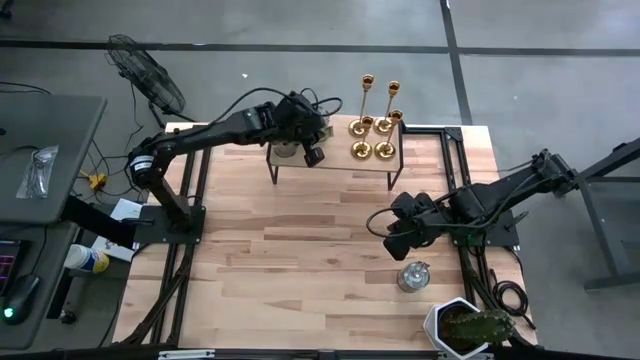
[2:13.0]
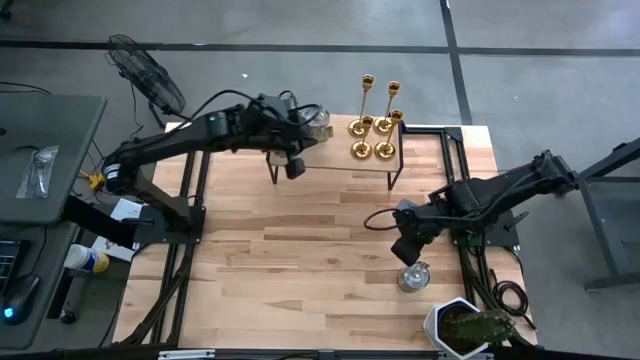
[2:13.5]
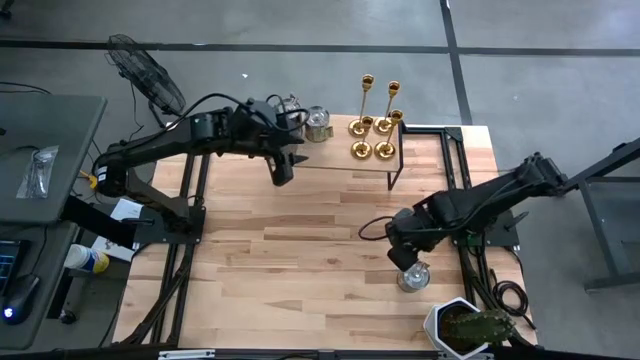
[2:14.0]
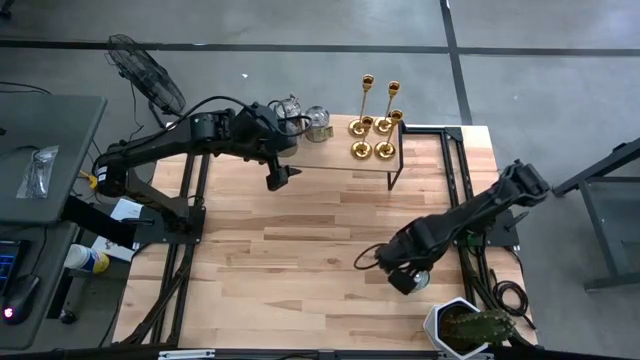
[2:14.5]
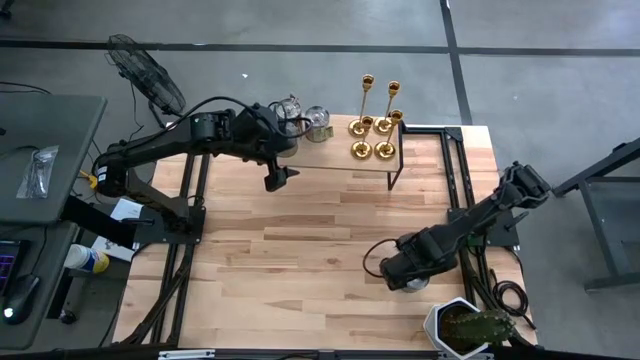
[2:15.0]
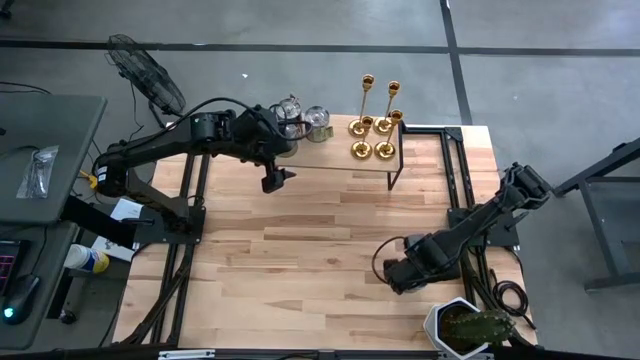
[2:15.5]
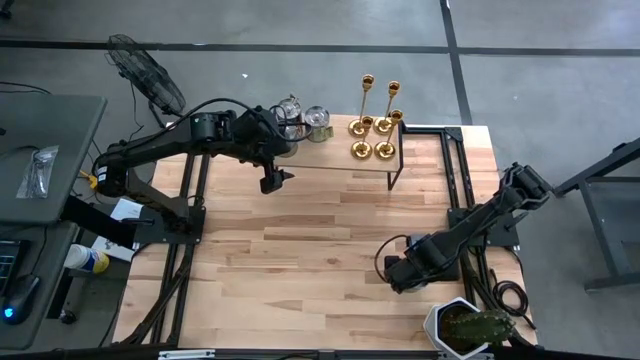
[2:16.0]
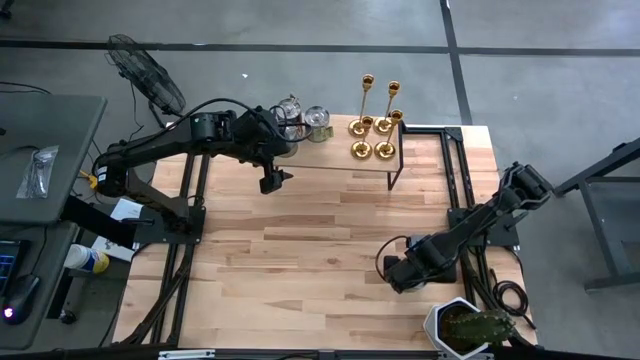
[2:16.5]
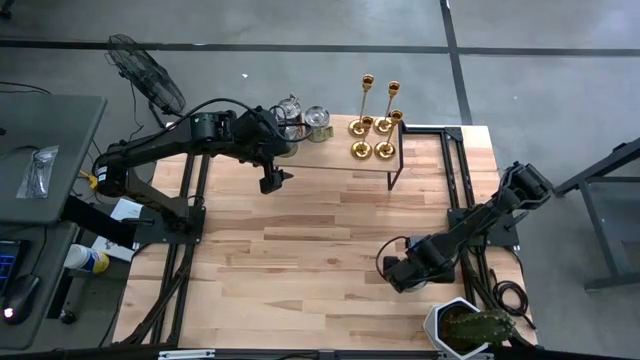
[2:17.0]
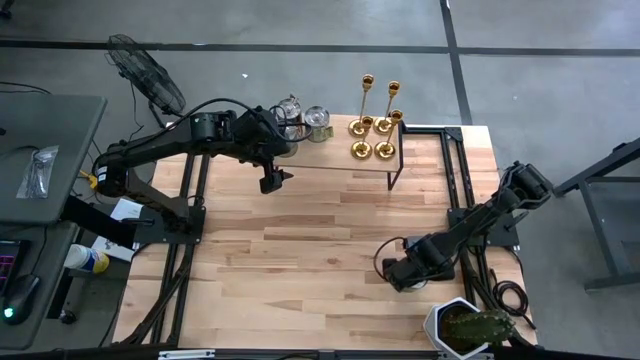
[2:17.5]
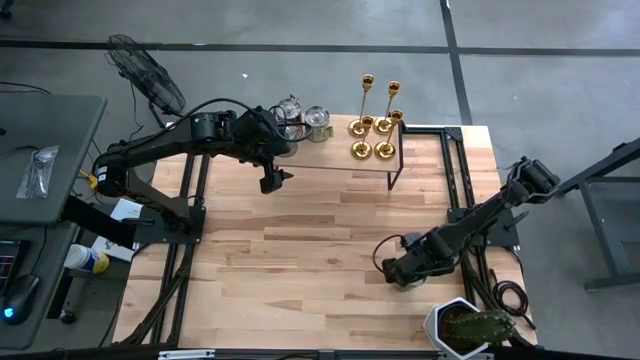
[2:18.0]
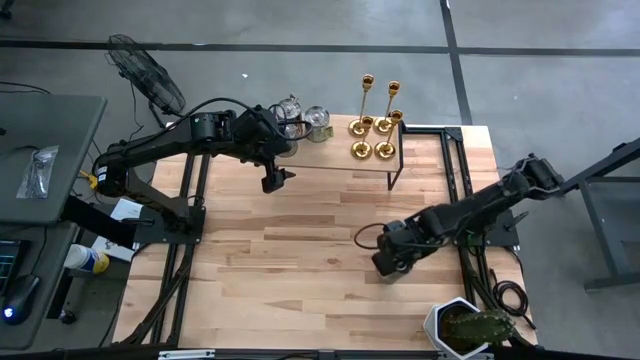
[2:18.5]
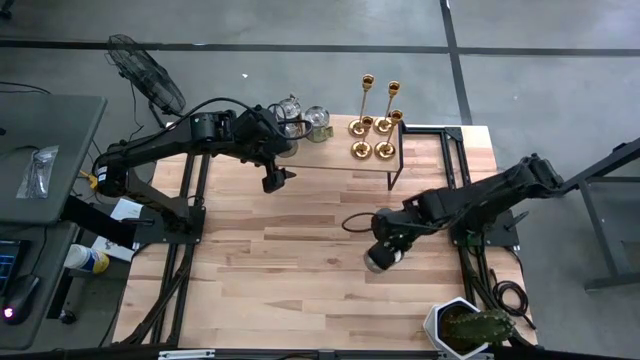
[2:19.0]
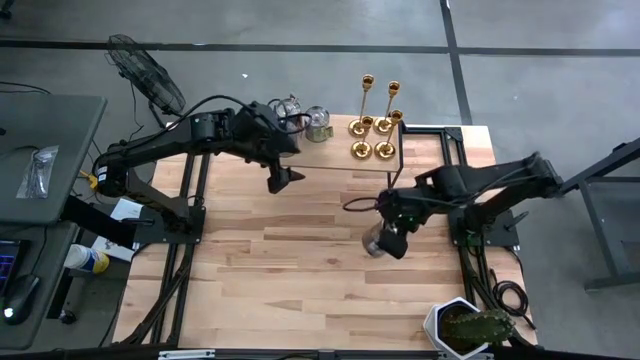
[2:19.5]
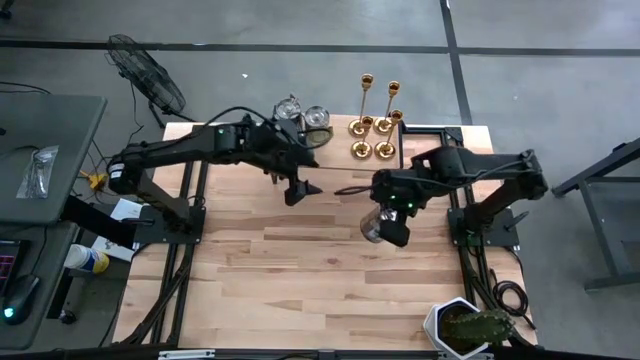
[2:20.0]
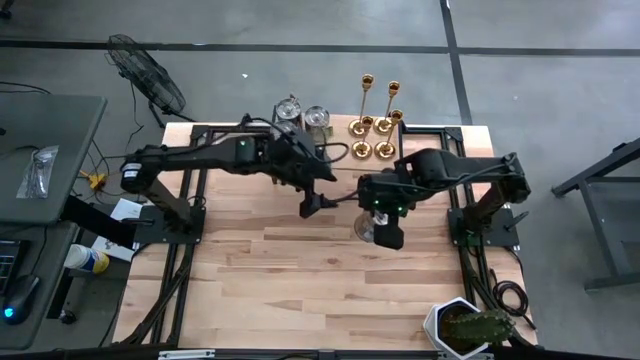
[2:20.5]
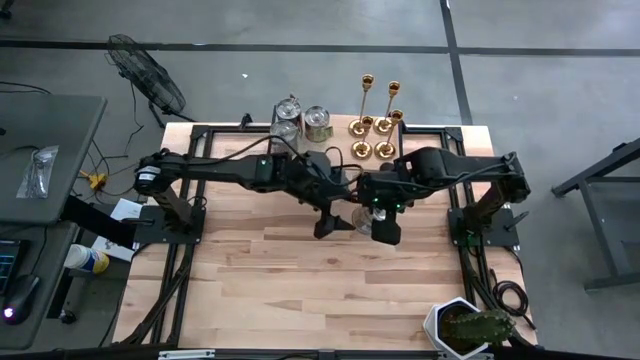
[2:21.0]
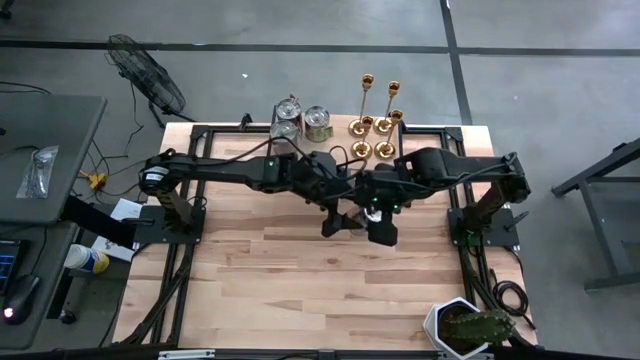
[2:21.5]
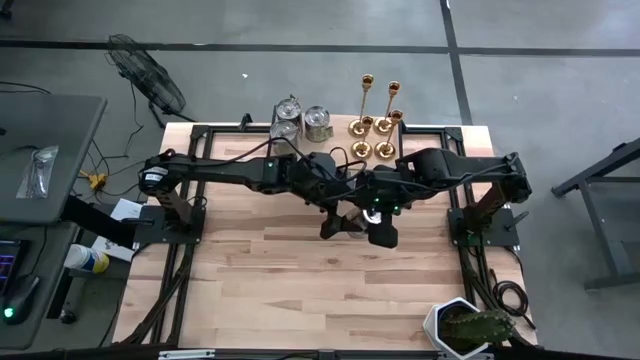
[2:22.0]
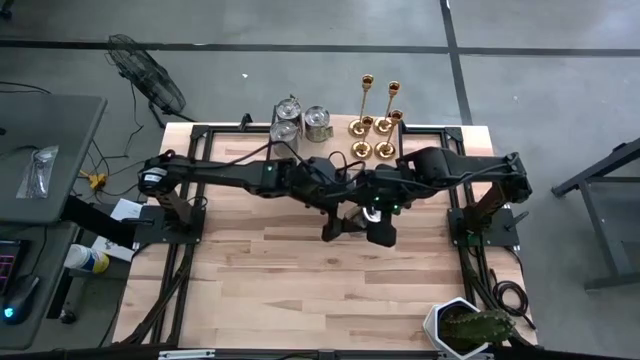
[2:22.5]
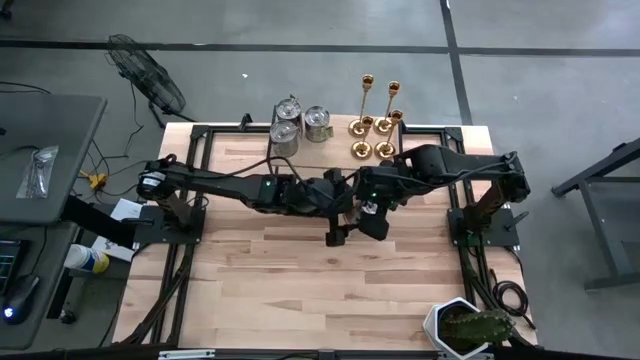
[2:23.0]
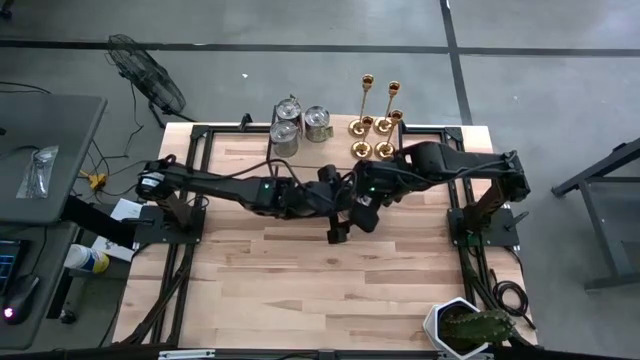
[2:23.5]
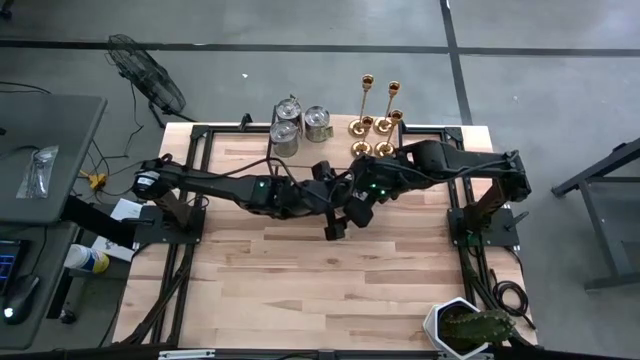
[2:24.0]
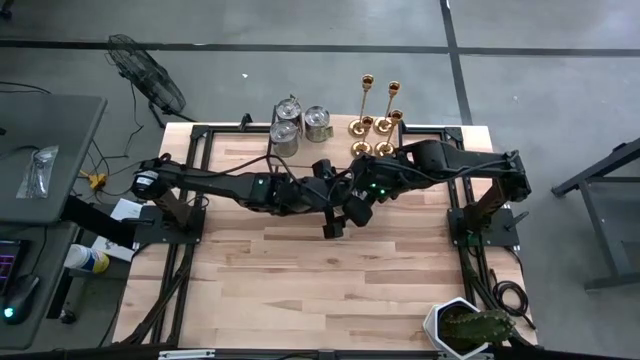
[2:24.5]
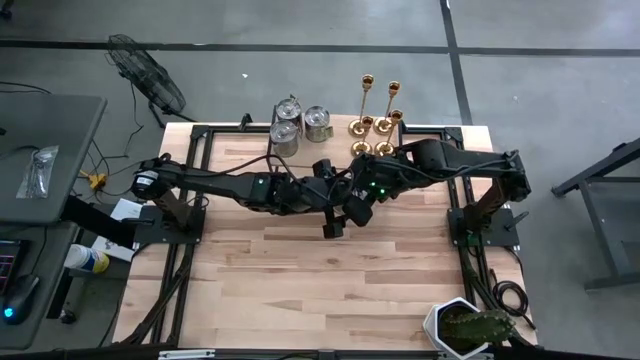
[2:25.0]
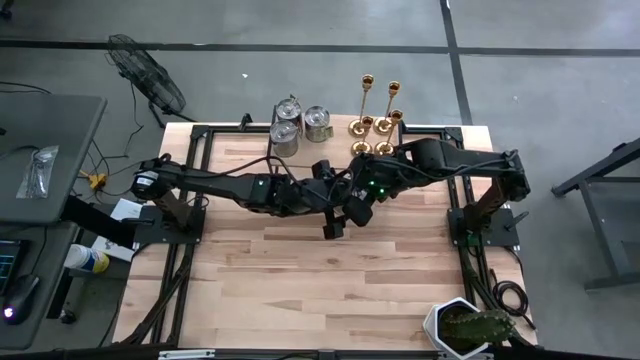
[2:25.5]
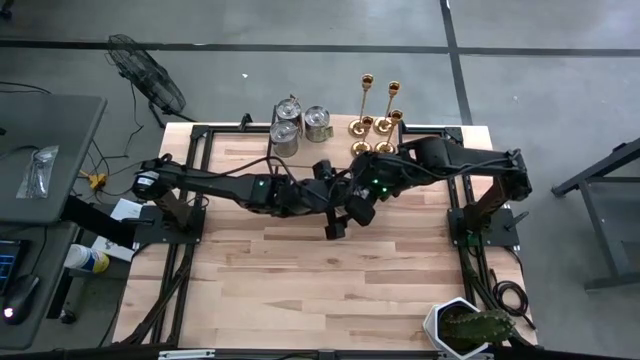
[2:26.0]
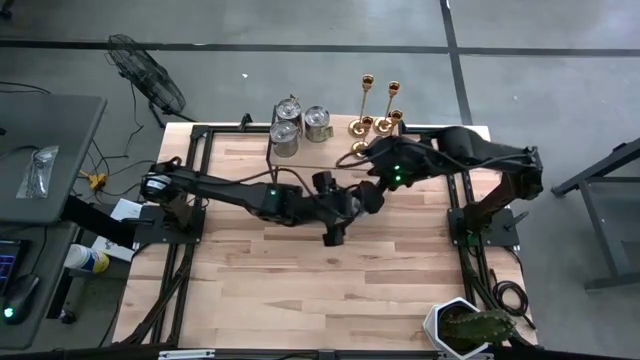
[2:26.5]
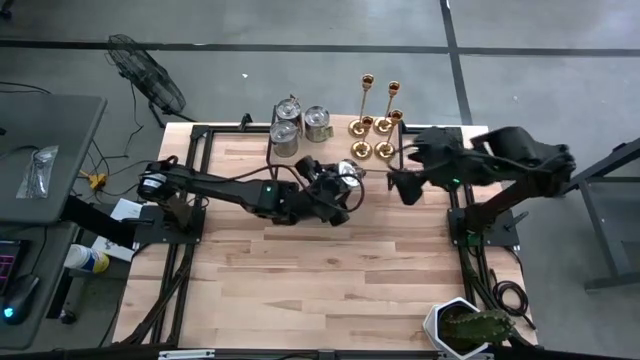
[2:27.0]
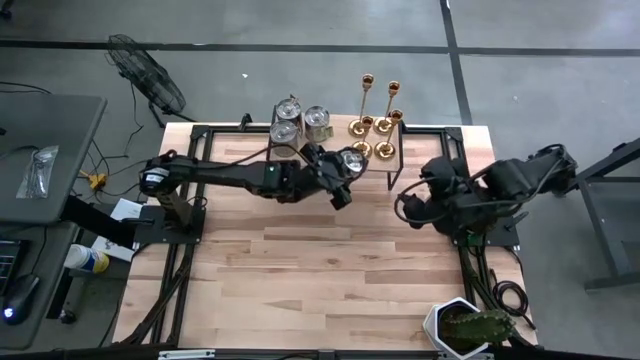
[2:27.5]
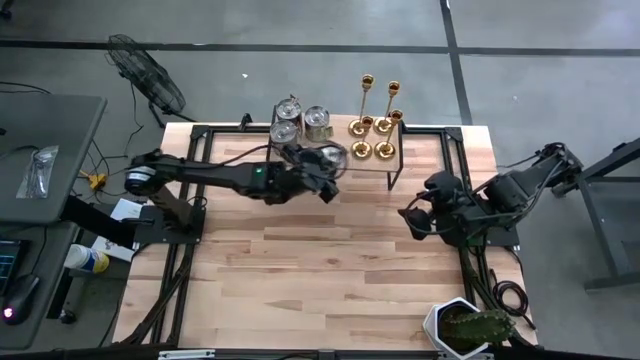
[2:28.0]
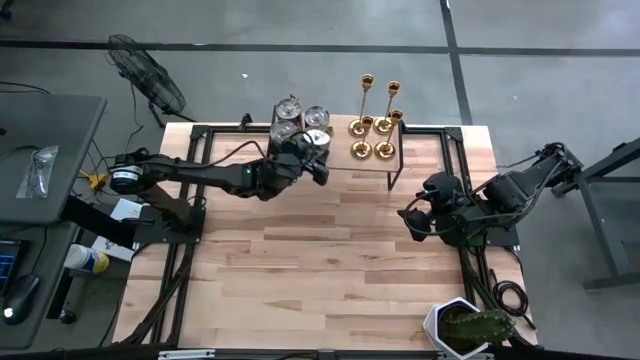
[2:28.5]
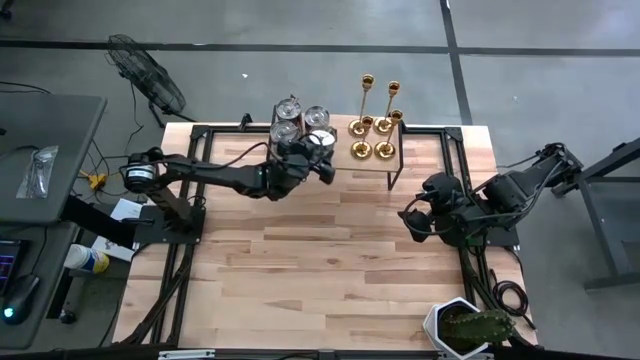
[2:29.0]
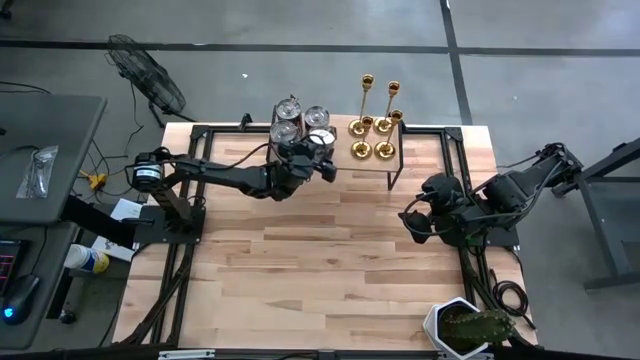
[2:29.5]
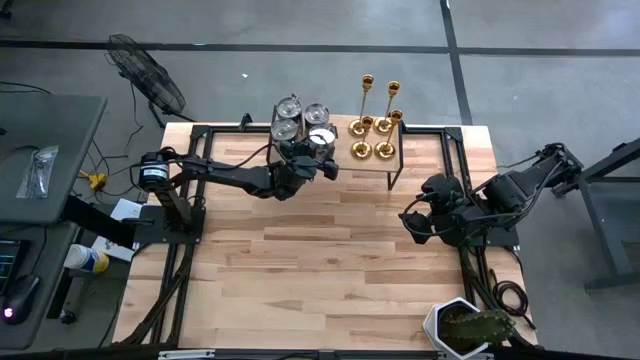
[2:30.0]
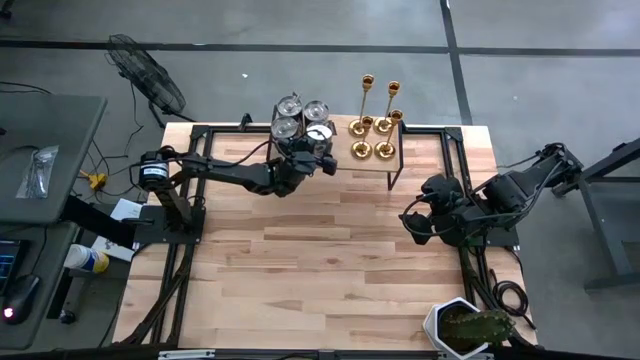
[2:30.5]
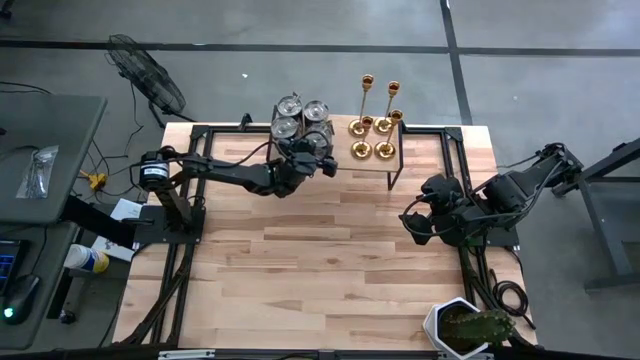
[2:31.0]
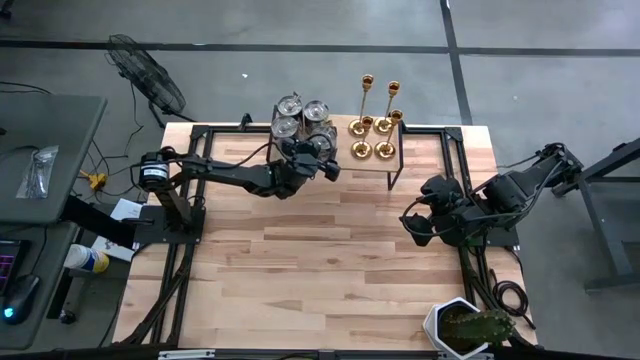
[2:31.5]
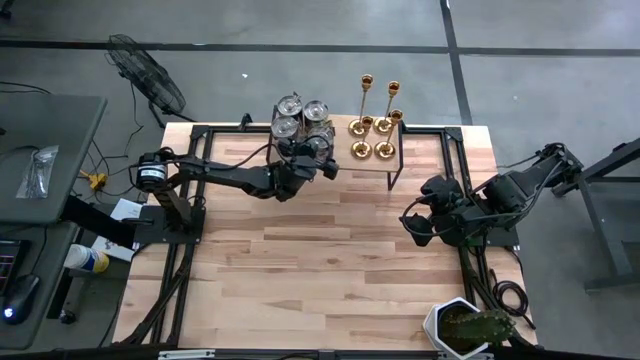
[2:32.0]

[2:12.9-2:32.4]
Task: Pick & Place candle stick holders
Align the silver scented candle on the shelf with the silver scented candle

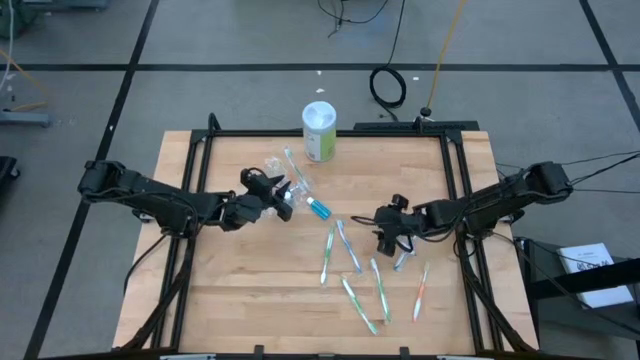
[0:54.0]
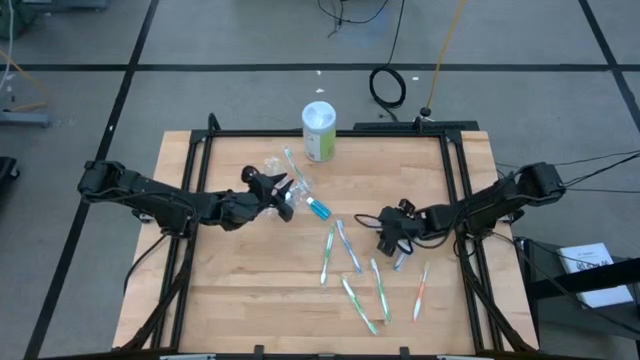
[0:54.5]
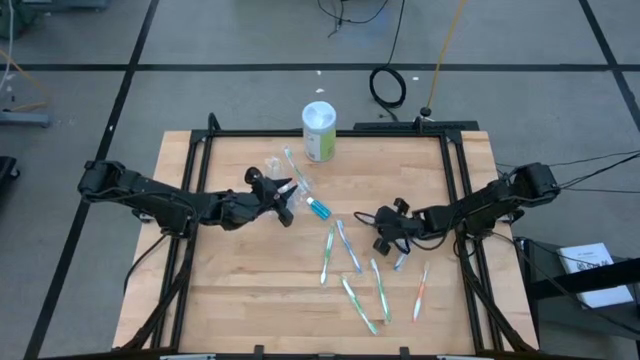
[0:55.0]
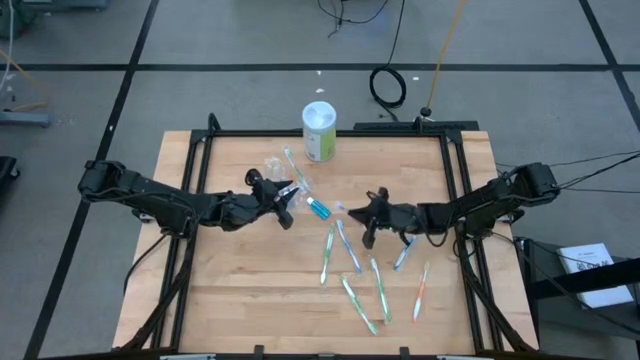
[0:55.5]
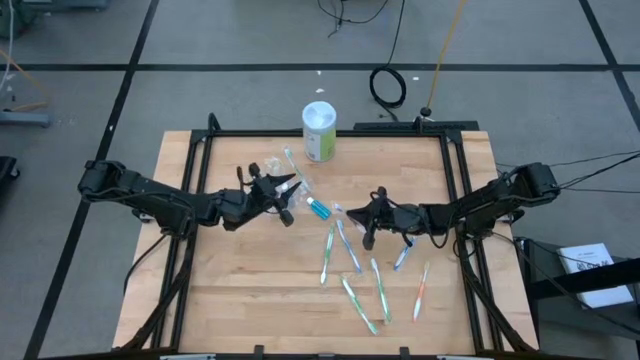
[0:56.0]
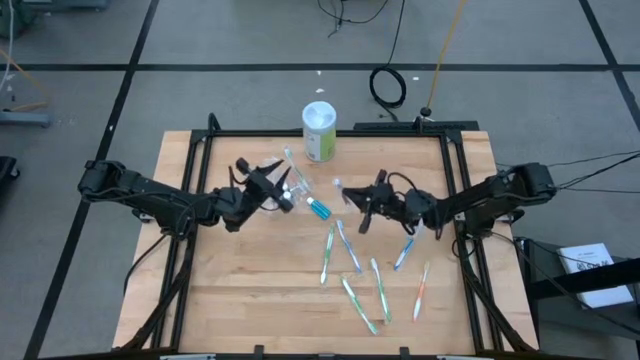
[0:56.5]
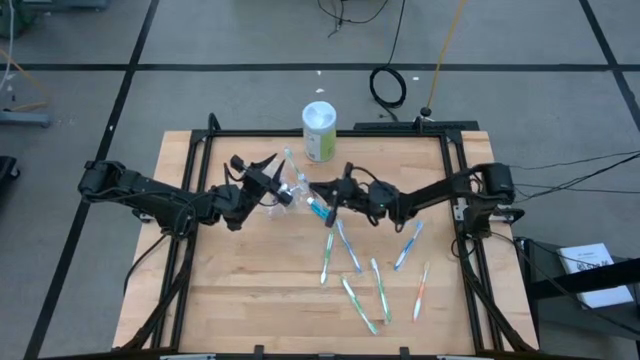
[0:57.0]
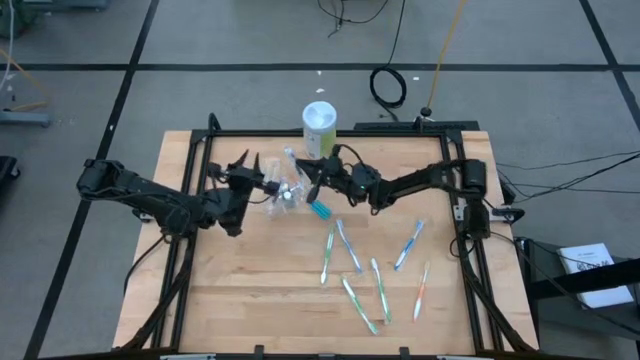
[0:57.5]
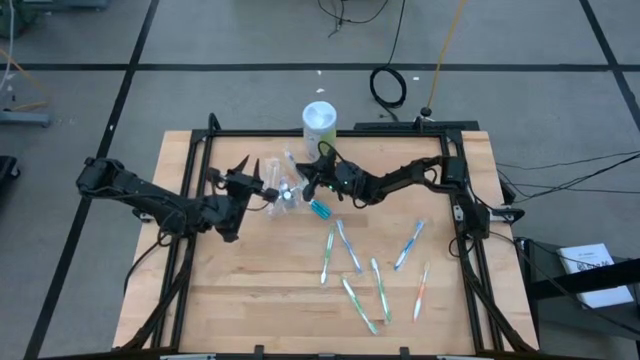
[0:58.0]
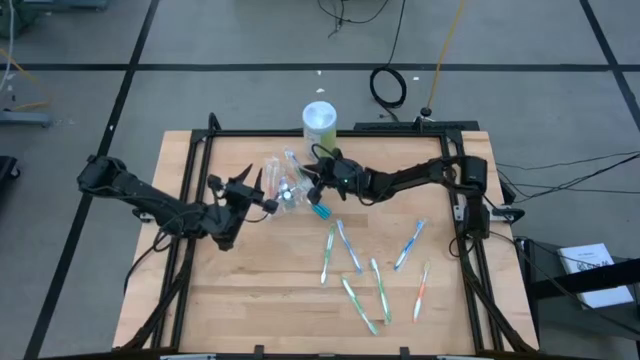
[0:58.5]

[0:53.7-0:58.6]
Task: Pick & Place toothbrushing station
Put the purple toothbrush into the transparent organizer
